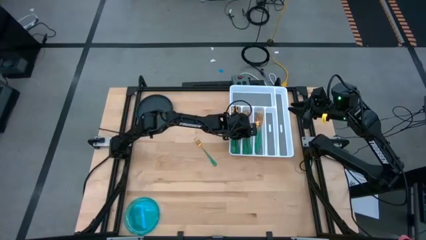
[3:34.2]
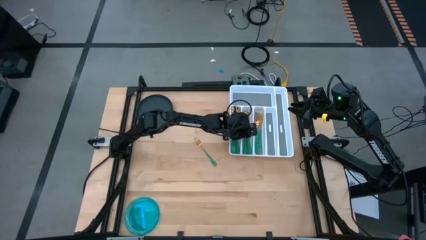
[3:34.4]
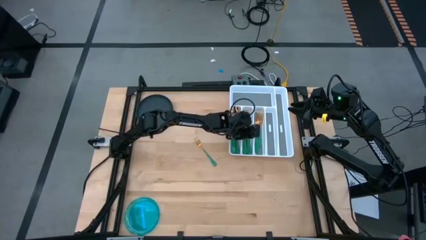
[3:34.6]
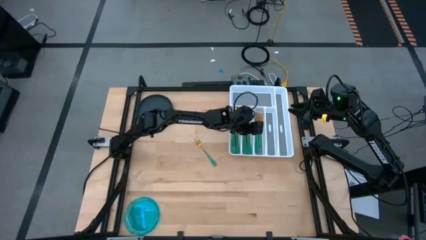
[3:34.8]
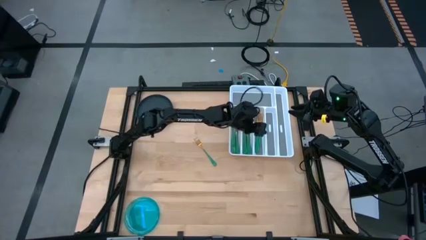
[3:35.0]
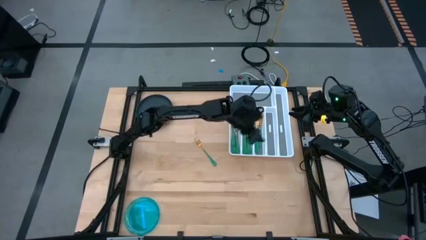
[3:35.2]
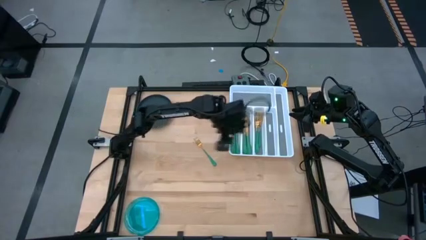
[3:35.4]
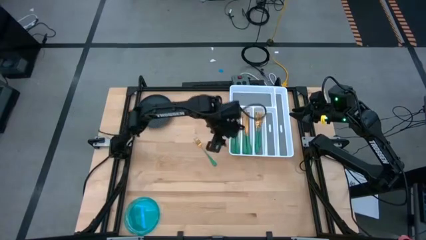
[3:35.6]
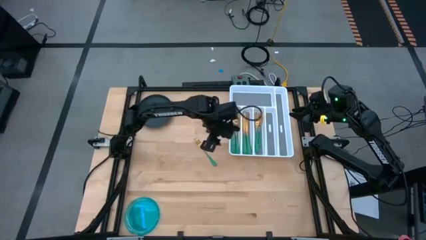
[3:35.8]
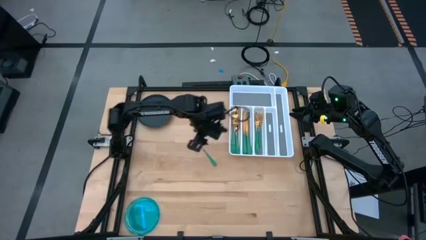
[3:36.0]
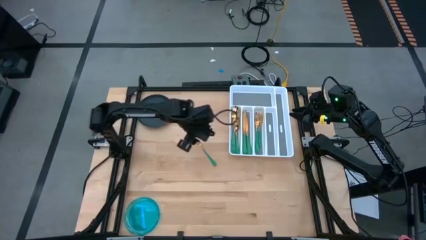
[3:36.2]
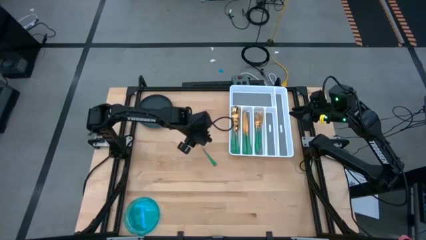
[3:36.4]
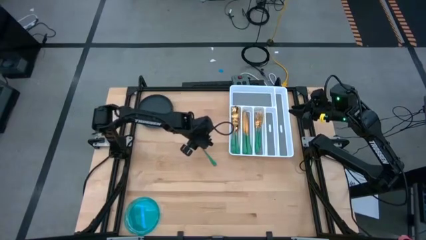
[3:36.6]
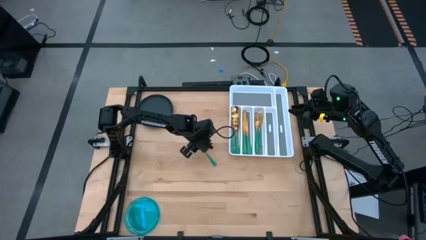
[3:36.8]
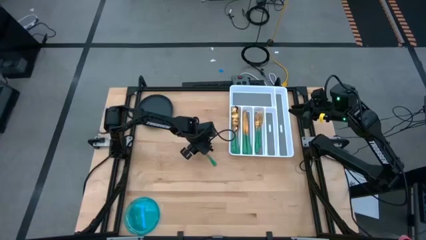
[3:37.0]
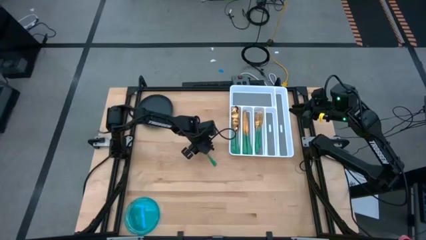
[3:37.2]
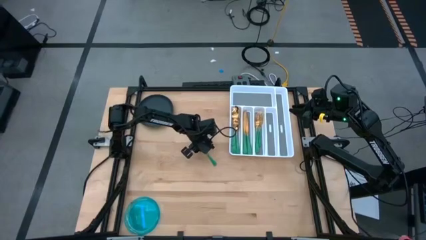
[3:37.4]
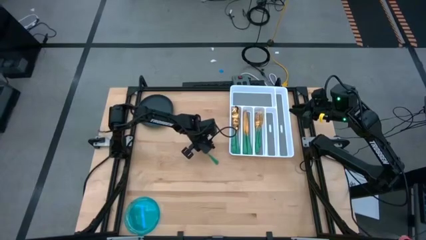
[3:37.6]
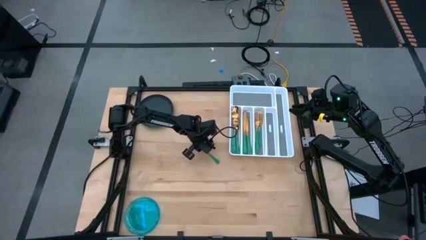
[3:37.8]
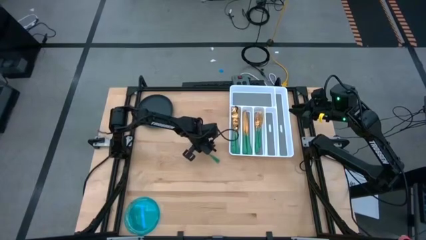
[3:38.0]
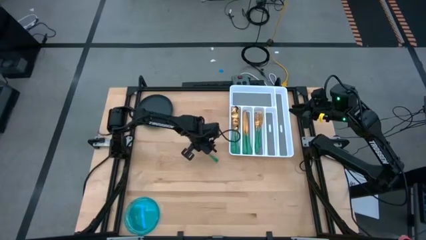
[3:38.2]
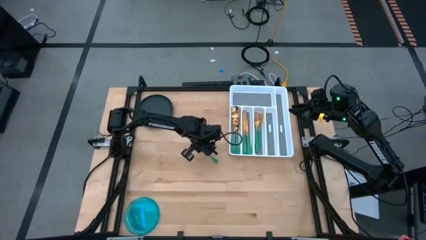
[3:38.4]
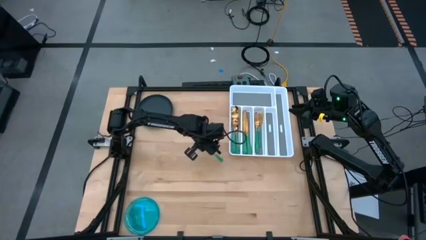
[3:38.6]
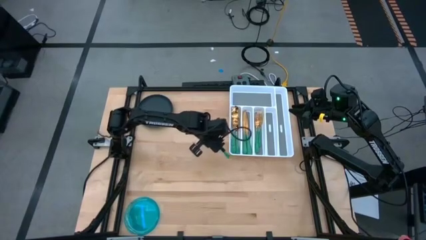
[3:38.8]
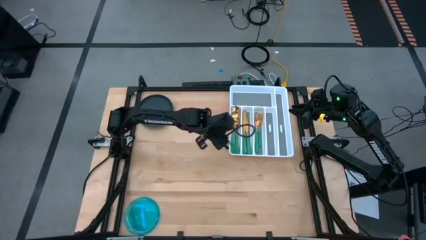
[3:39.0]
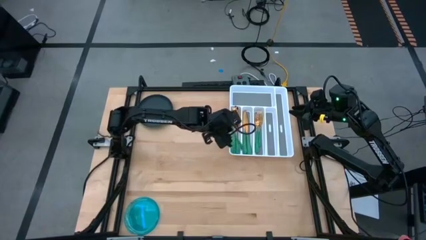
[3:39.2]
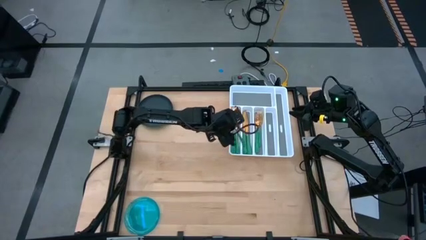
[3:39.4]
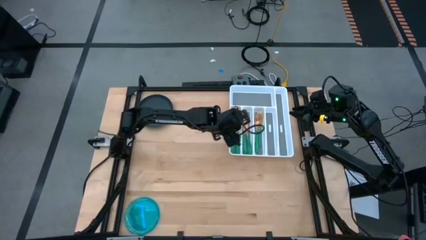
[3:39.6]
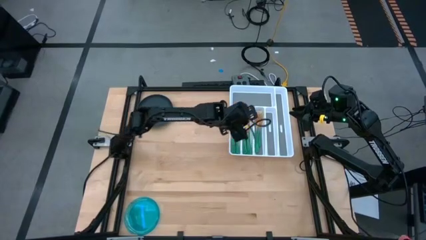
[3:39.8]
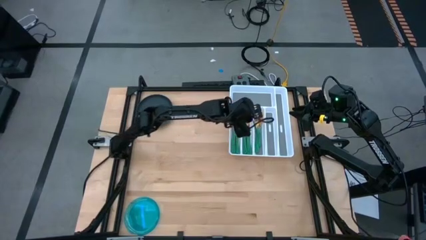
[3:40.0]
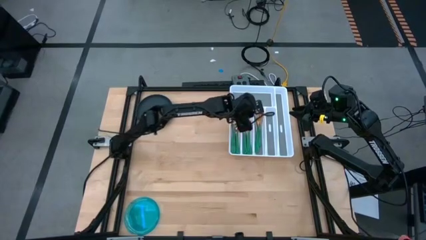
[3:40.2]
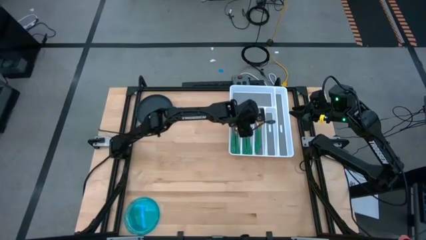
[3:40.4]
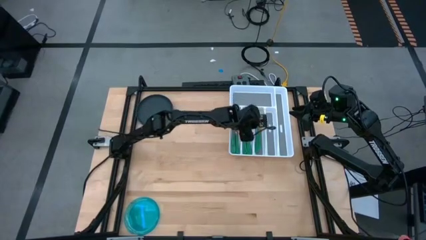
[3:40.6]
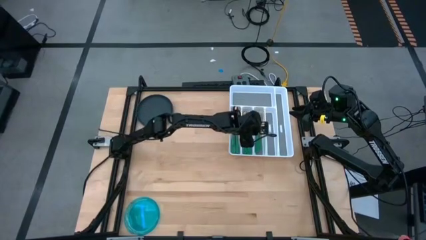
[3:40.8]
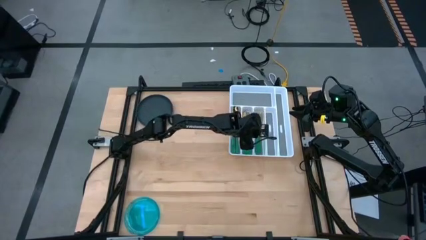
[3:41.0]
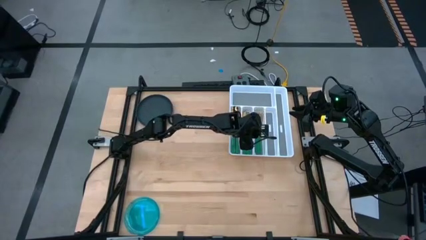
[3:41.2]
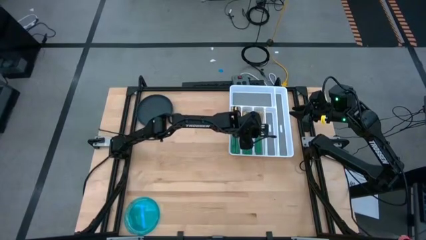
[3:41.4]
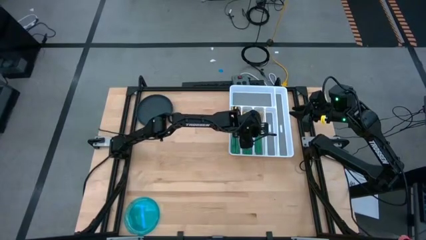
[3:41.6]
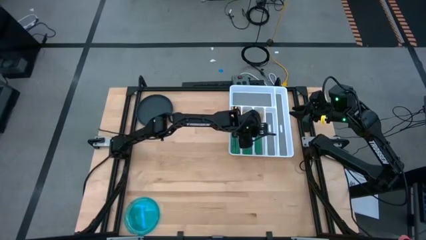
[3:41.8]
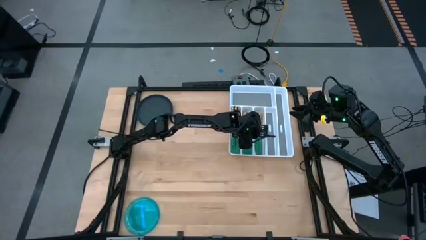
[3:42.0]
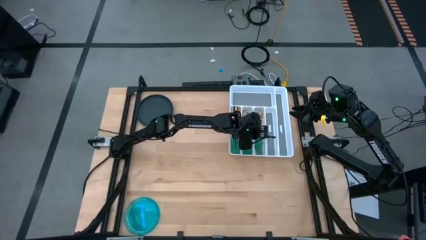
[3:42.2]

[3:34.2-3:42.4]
Task: Sort silverware
Put the green fork on the silverware organizer

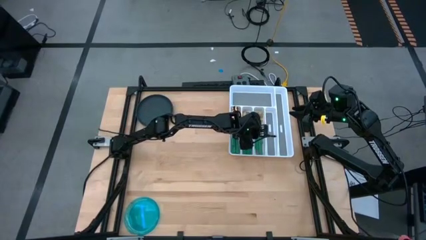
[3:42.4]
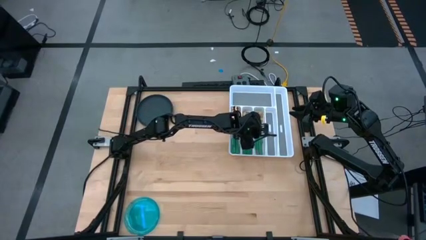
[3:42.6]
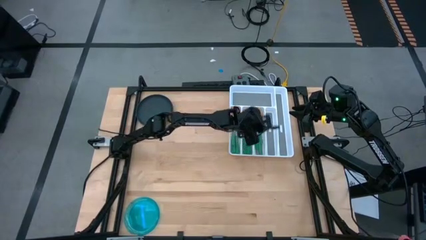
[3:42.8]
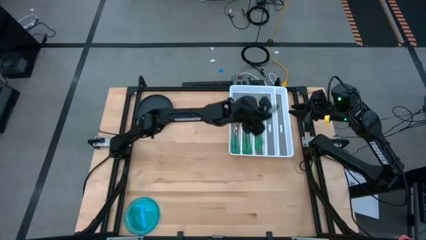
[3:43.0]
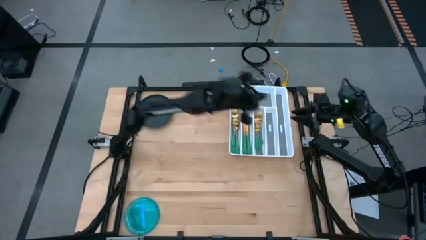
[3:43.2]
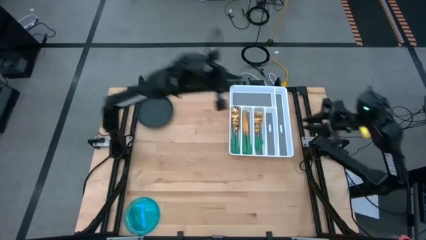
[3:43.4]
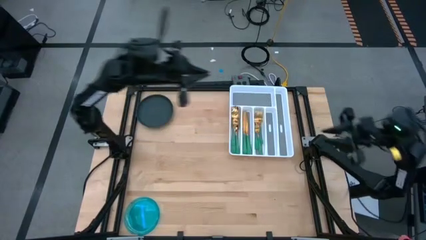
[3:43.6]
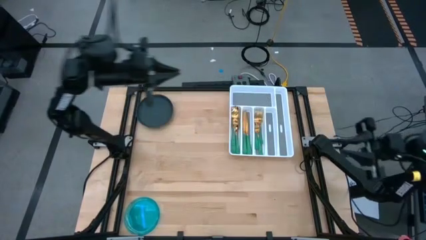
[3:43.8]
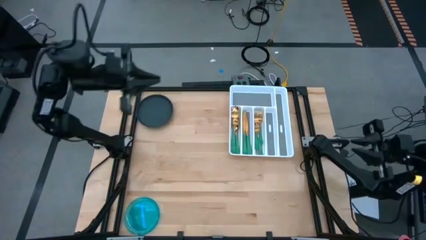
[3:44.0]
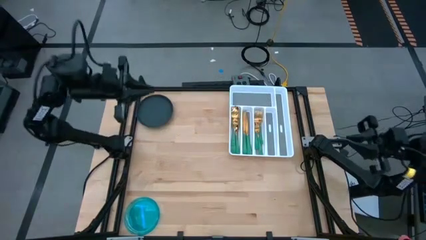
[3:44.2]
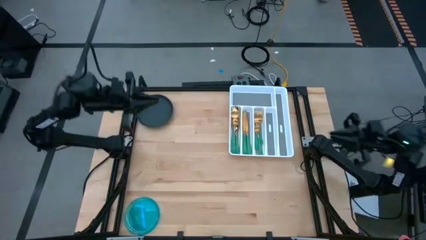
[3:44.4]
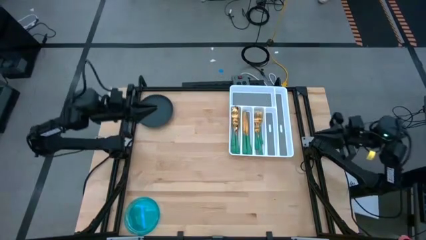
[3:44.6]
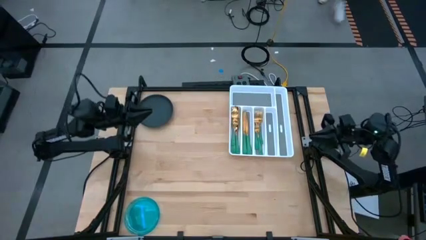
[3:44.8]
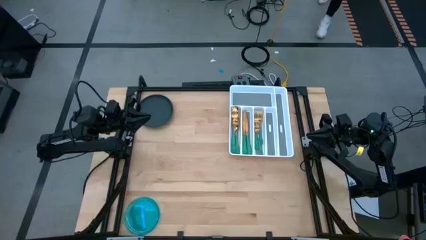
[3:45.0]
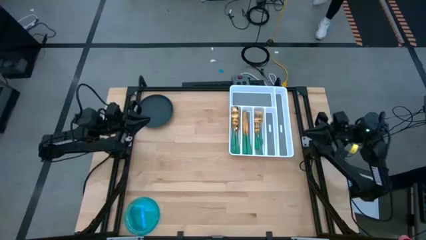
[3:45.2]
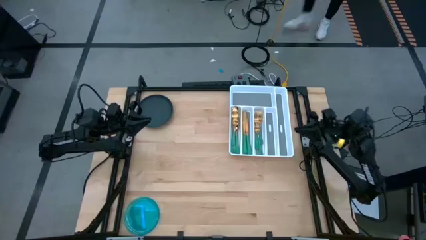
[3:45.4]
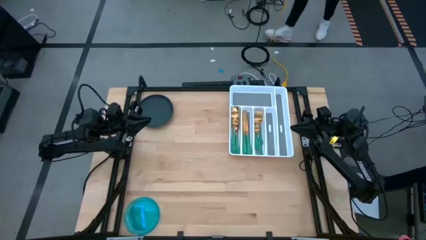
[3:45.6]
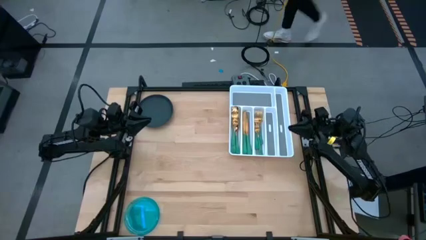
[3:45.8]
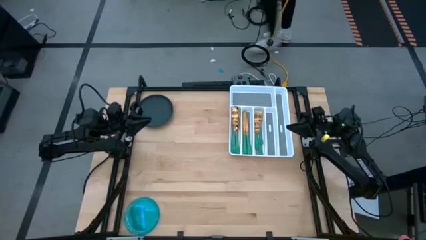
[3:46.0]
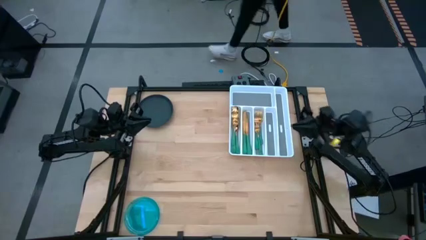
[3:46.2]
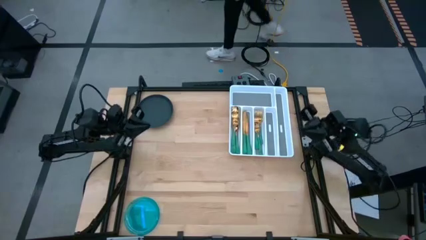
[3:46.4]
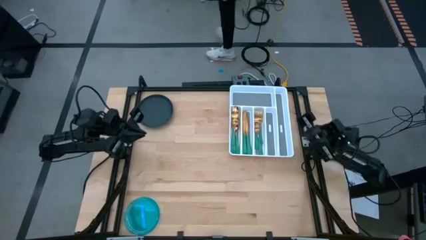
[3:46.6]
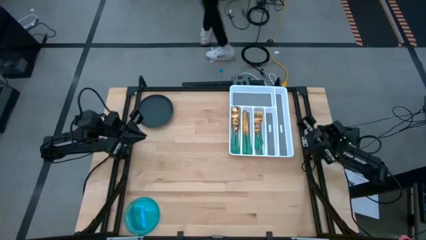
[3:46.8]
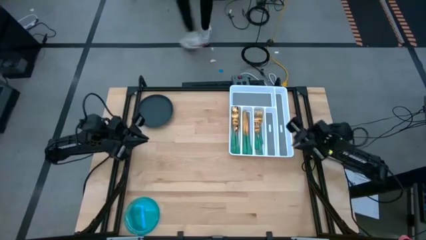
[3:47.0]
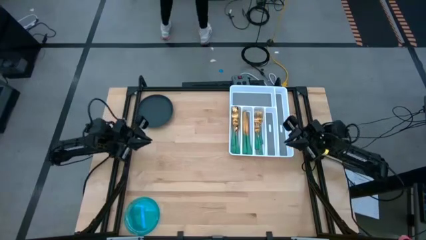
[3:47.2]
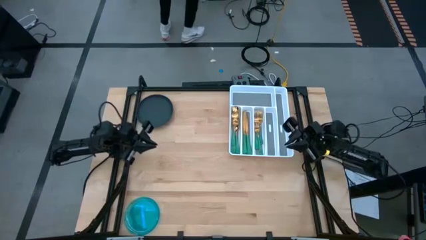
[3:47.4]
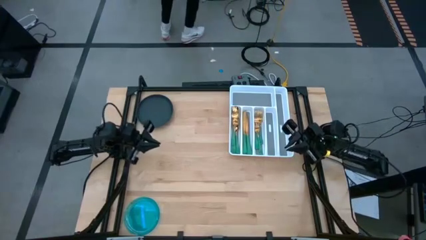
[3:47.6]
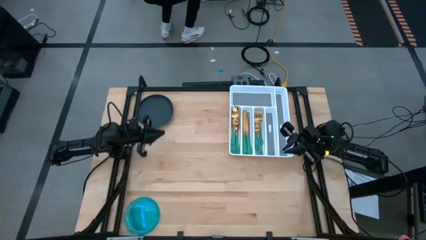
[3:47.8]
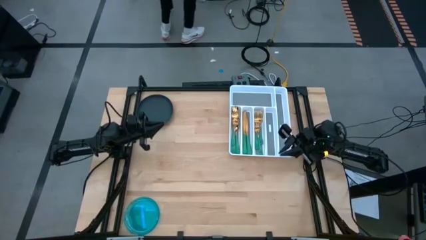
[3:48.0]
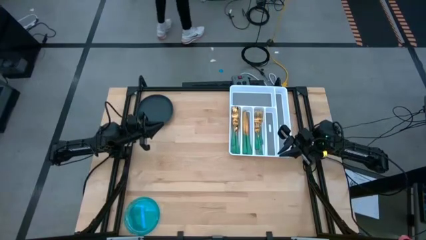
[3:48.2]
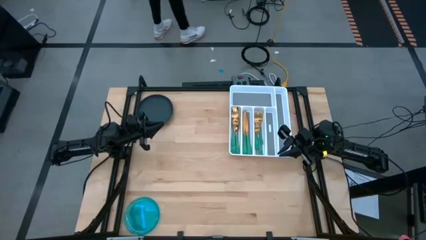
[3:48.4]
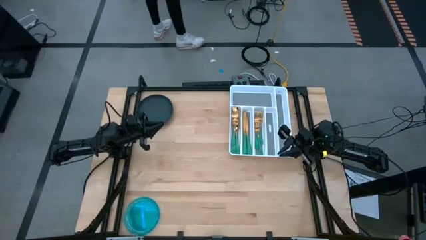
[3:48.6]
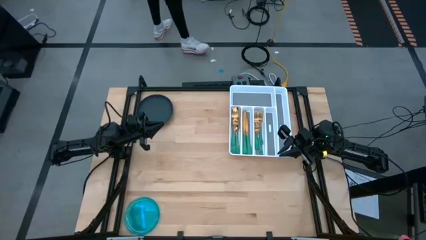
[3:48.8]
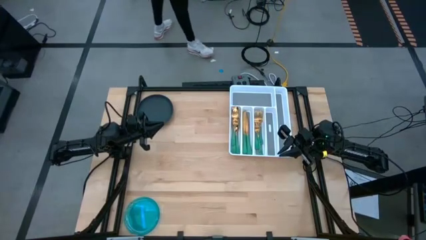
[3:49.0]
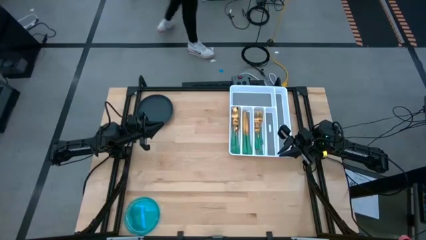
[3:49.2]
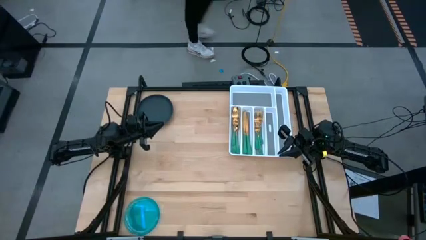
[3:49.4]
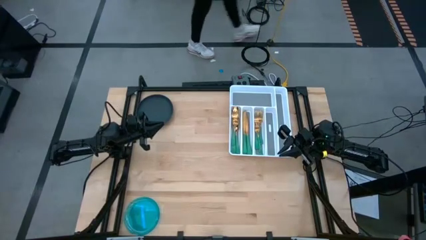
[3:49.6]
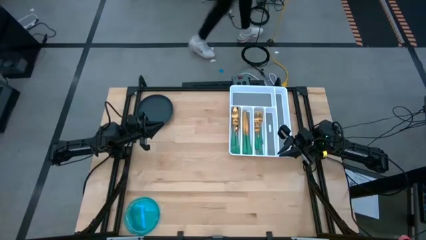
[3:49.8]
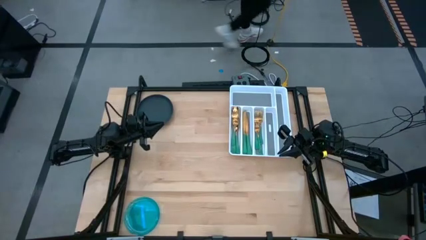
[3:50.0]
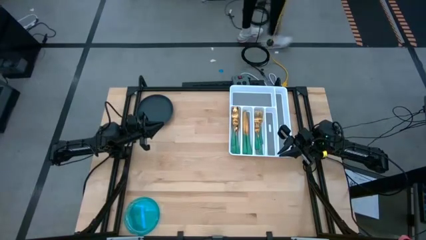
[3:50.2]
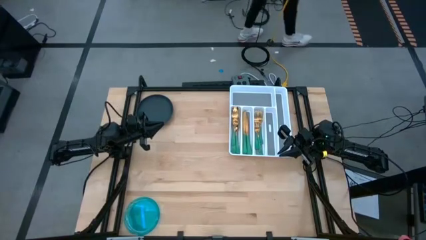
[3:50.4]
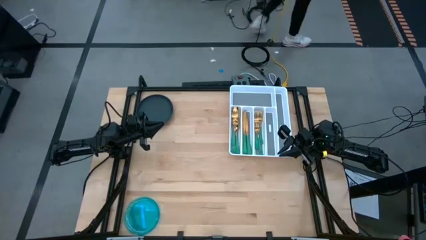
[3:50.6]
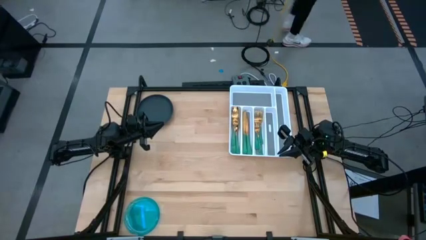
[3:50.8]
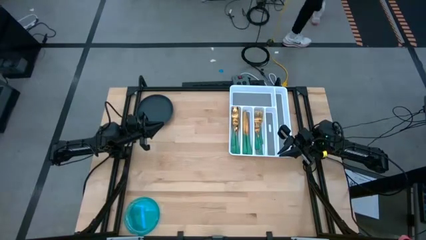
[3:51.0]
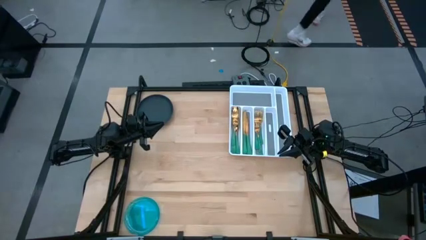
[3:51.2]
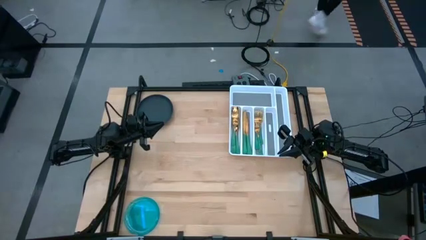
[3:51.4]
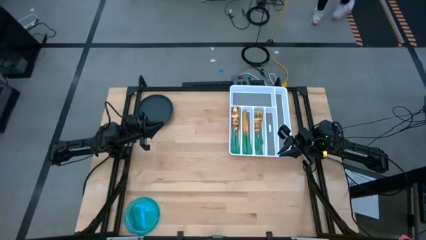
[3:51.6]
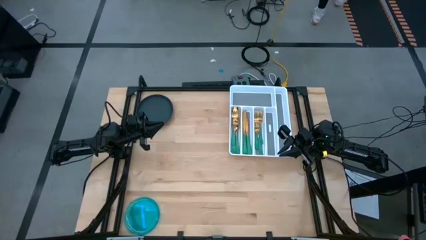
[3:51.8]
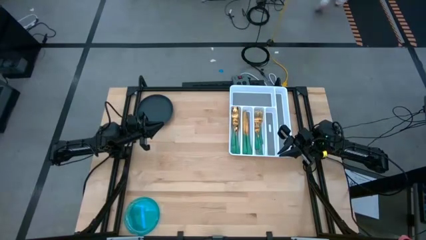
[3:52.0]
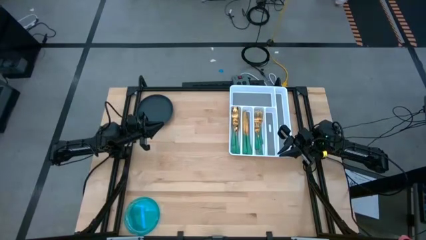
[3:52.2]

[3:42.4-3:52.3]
Return to Home Position
